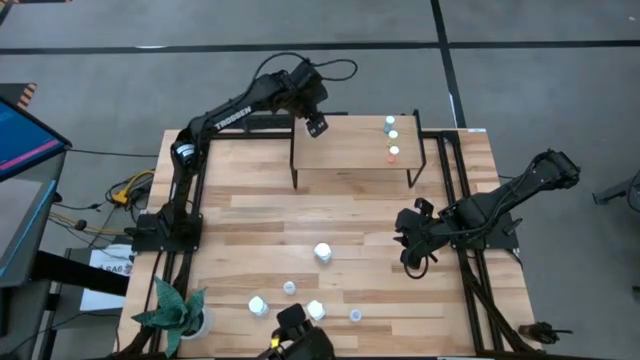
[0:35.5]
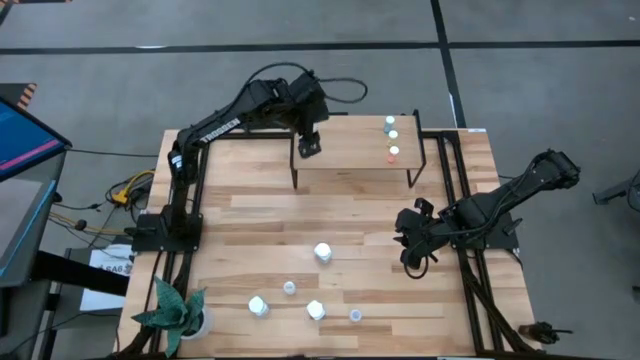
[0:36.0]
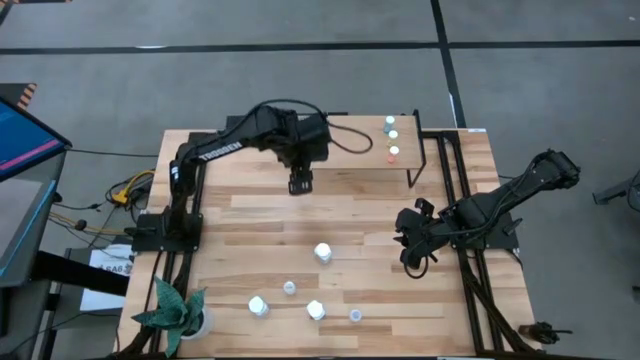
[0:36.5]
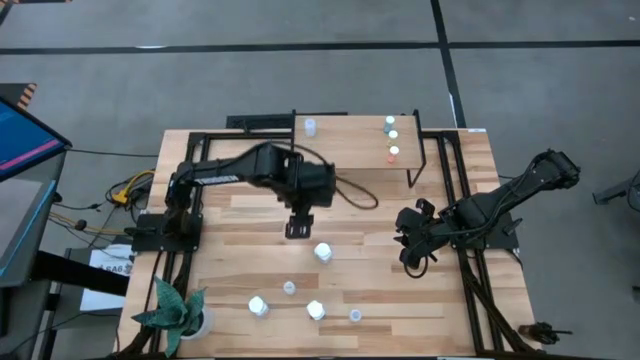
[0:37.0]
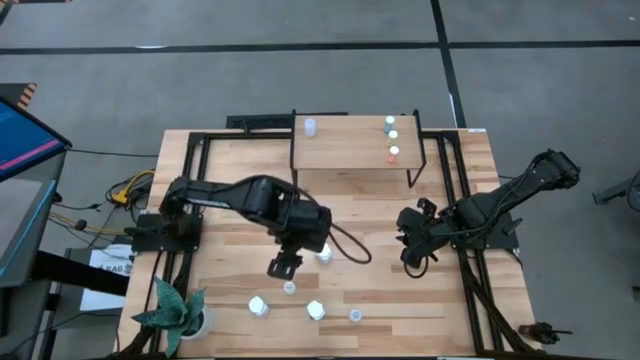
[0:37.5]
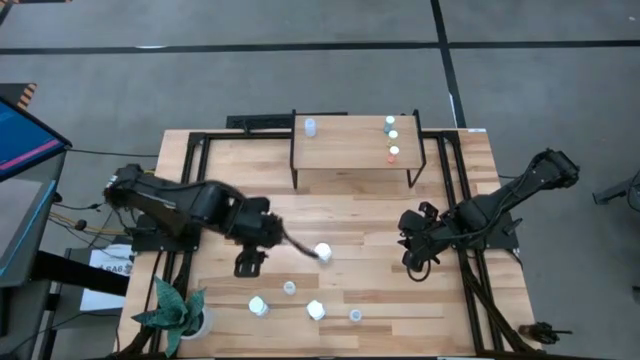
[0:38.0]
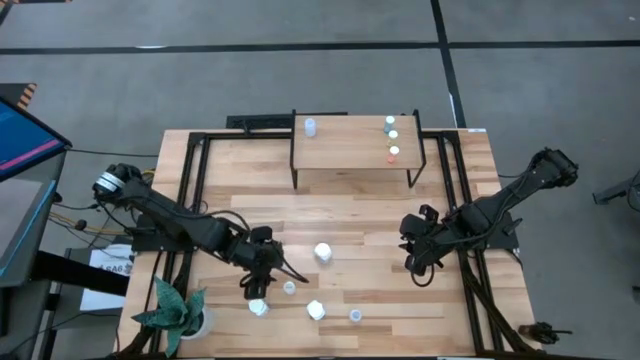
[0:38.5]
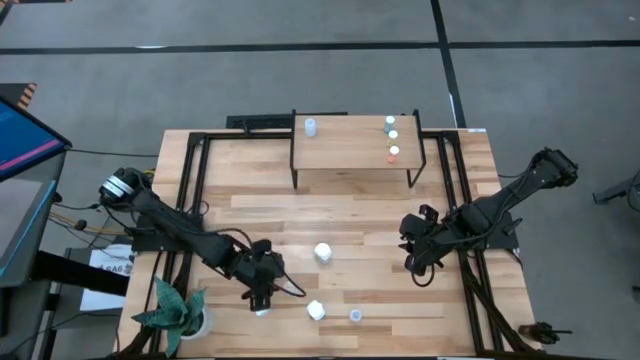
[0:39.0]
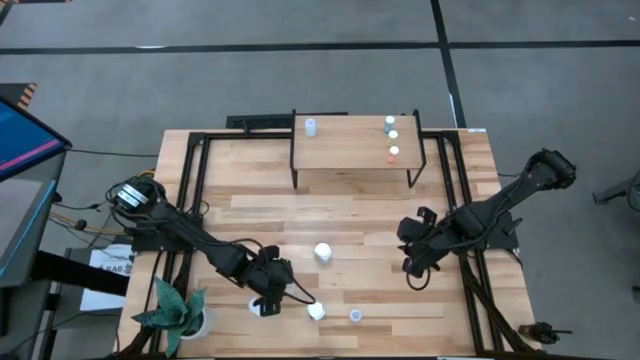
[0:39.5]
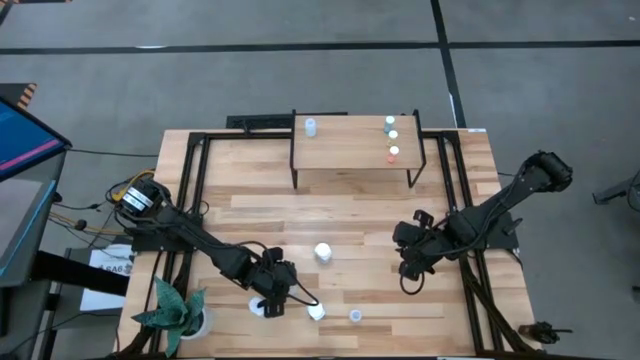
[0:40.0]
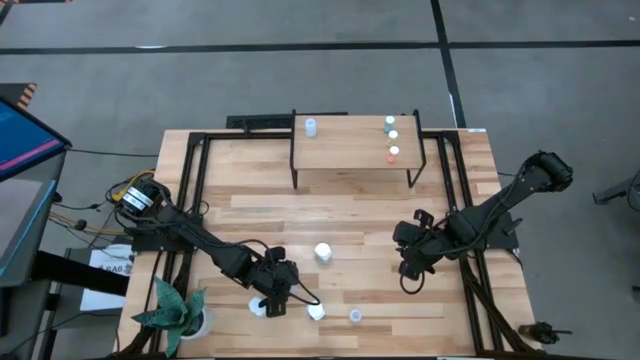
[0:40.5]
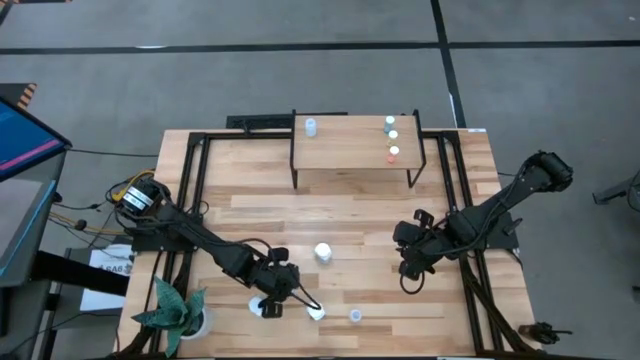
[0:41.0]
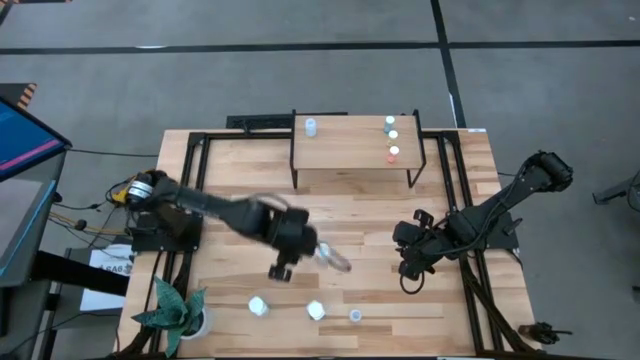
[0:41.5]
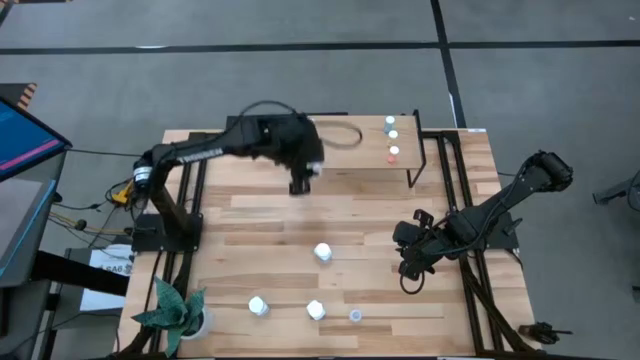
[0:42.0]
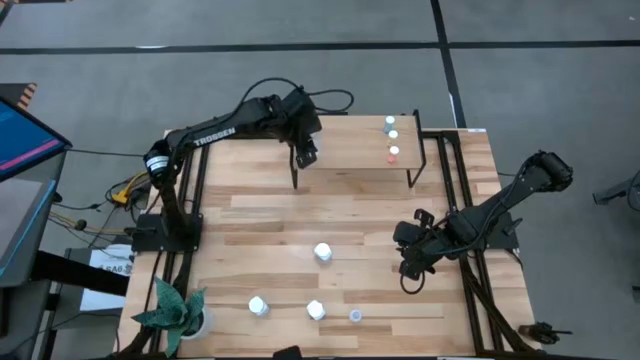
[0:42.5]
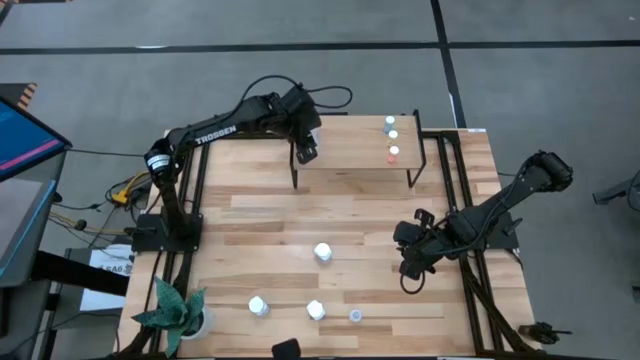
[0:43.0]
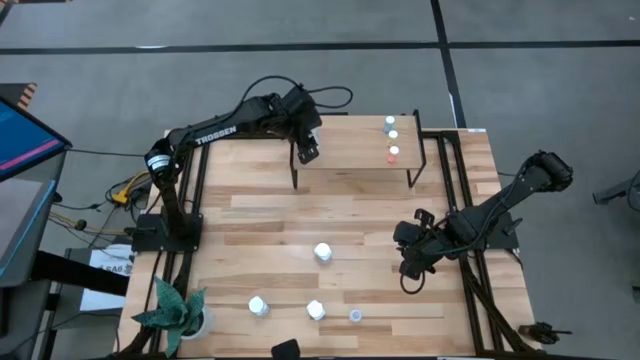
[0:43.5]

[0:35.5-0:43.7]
Task: Pick and place medicine bottles onto shelf by color
Put the top white small pill bottle on the shelf

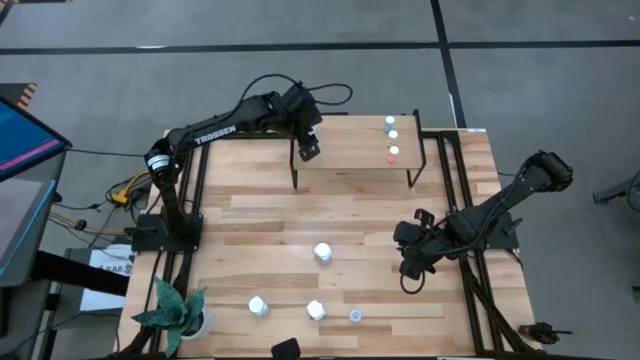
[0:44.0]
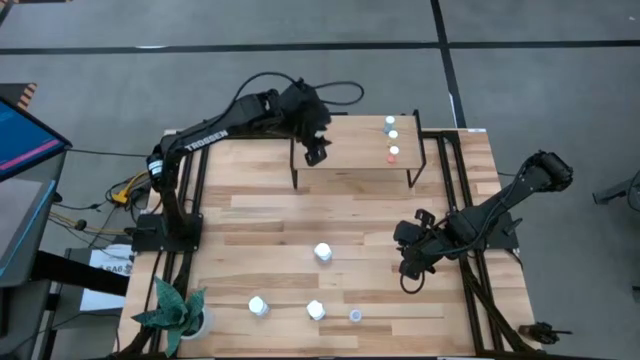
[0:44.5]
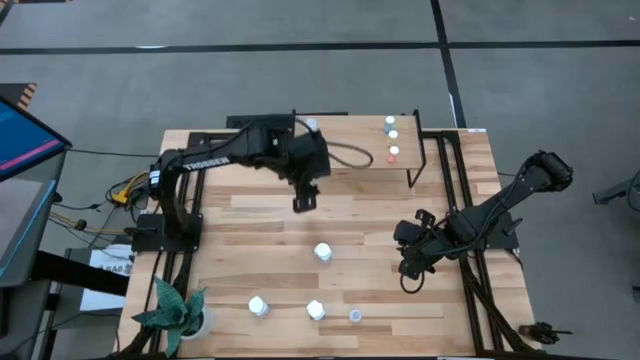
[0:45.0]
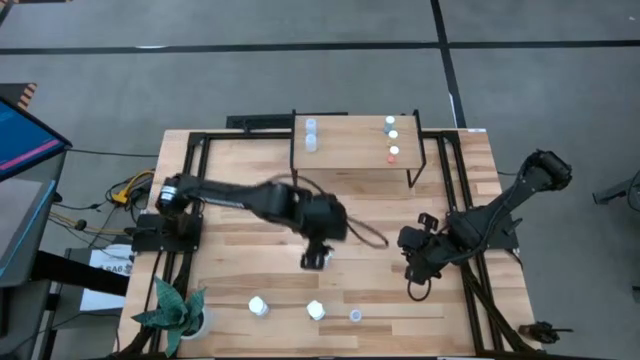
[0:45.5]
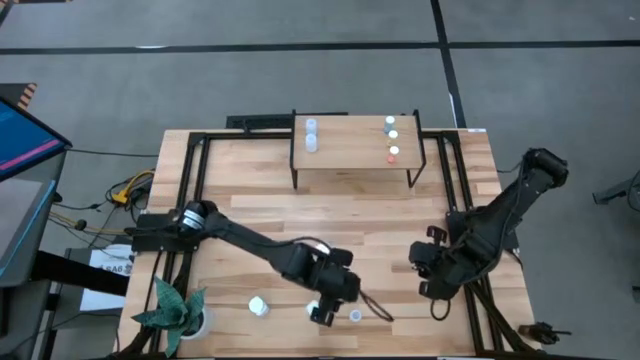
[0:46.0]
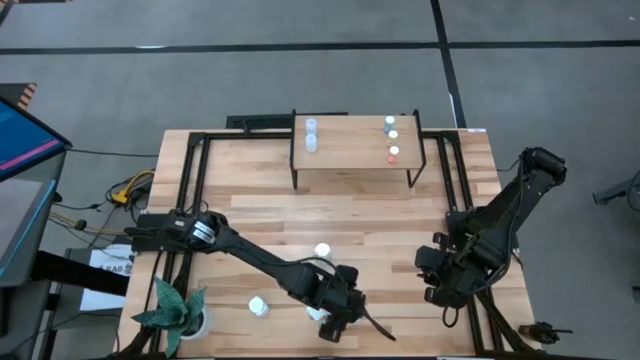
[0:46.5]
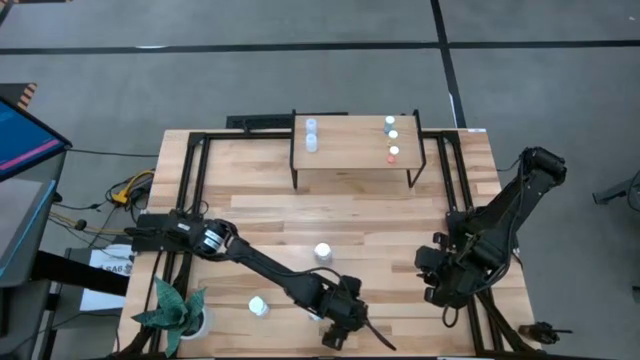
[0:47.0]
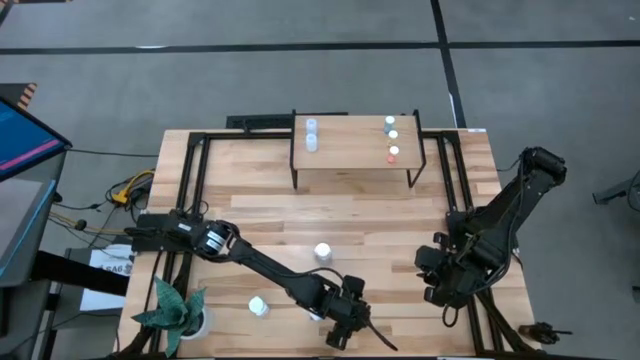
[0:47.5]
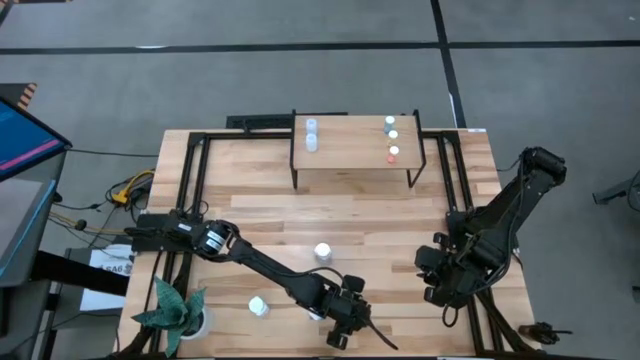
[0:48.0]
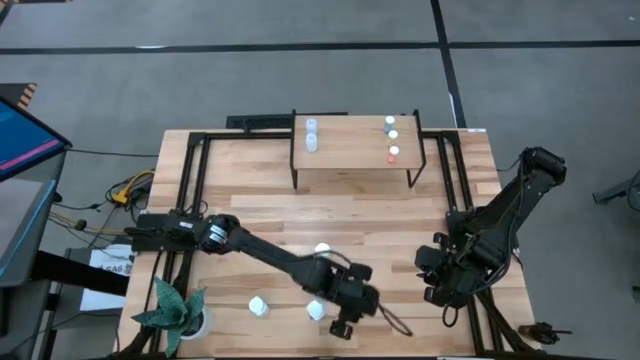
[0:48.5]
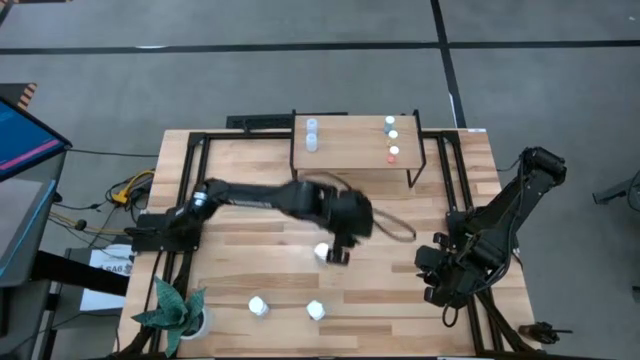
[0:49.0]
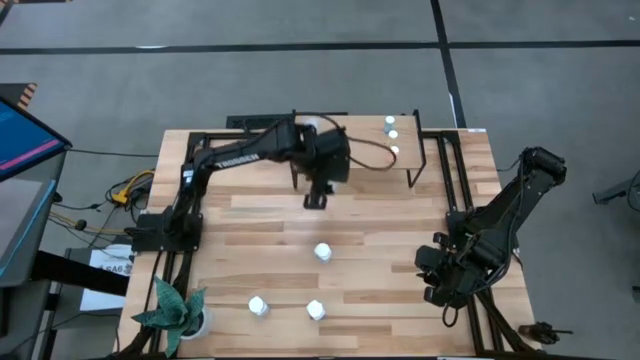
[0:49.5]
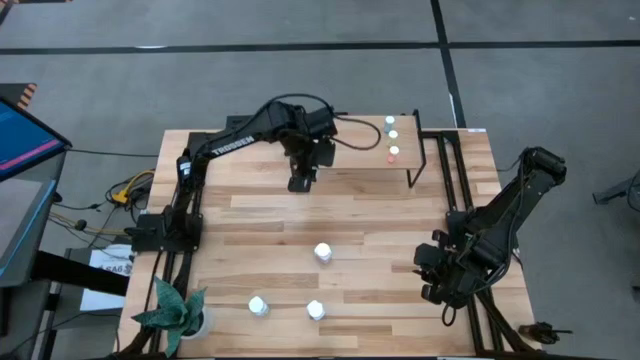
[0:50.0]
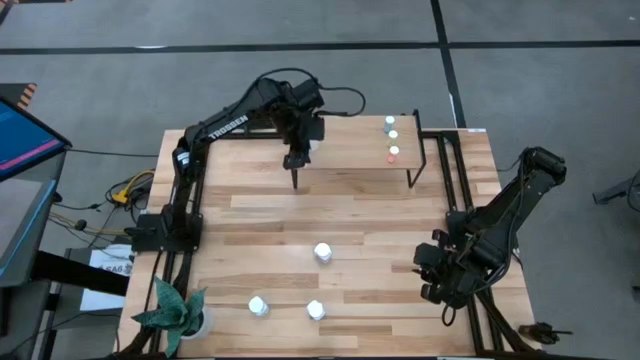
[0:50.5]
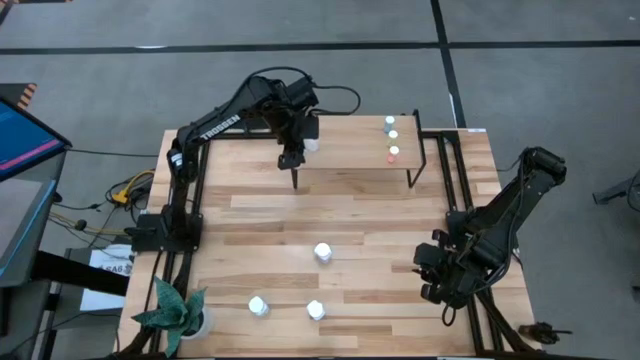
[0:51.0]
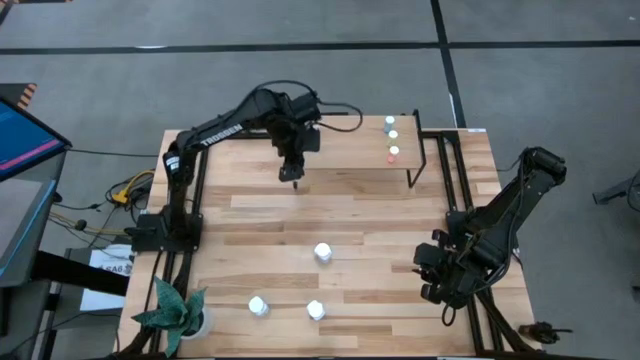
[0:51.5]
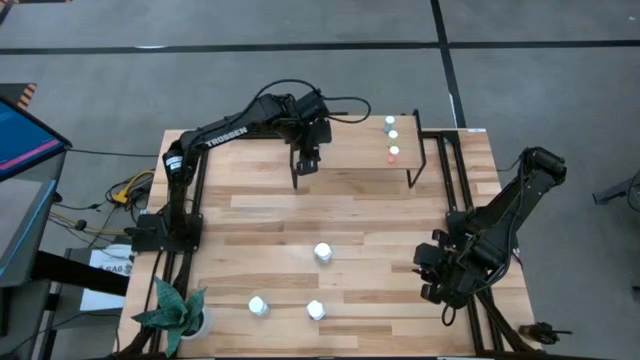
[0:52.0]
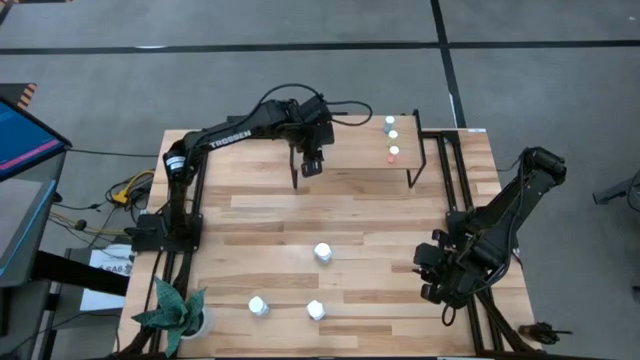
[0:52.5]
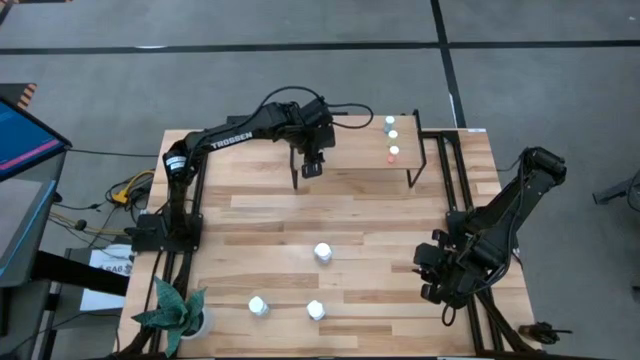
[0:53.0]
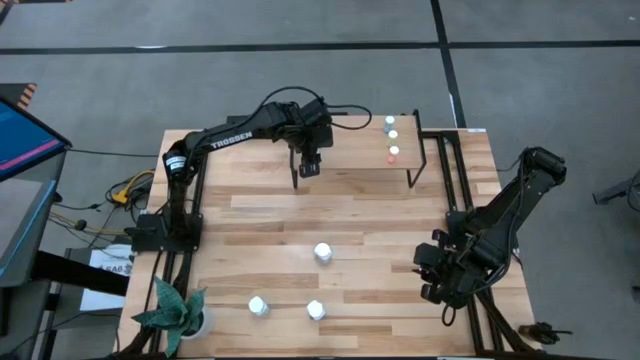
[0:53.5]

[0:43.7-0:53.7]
Put the white small pill bottle on the shelf

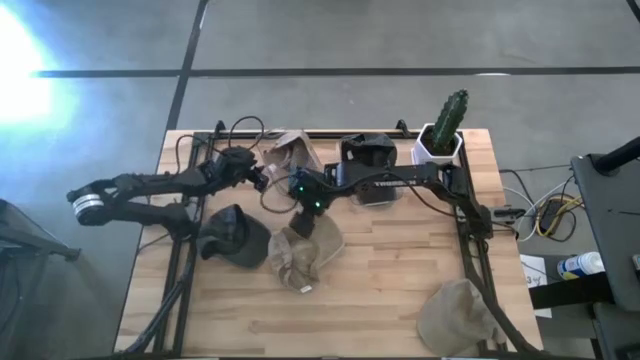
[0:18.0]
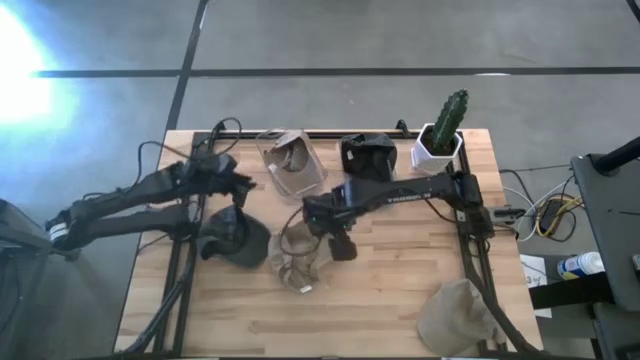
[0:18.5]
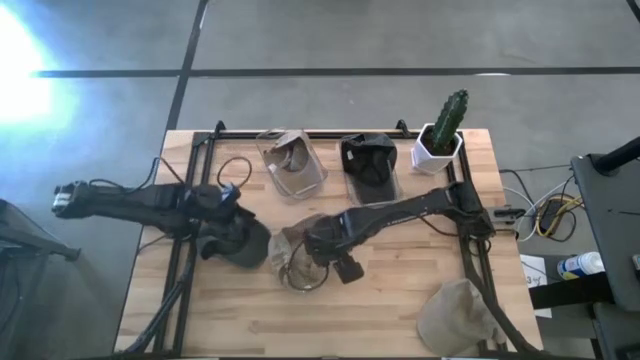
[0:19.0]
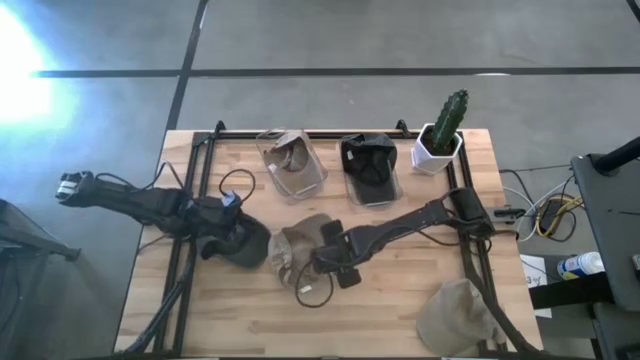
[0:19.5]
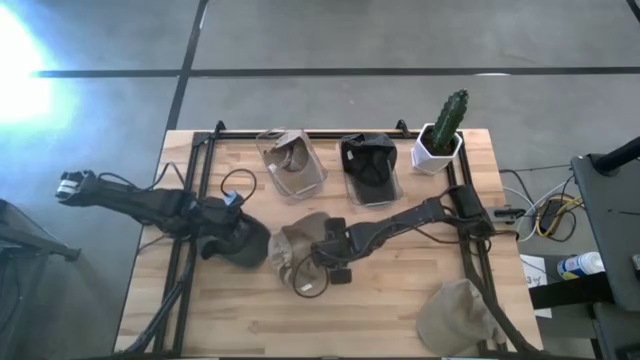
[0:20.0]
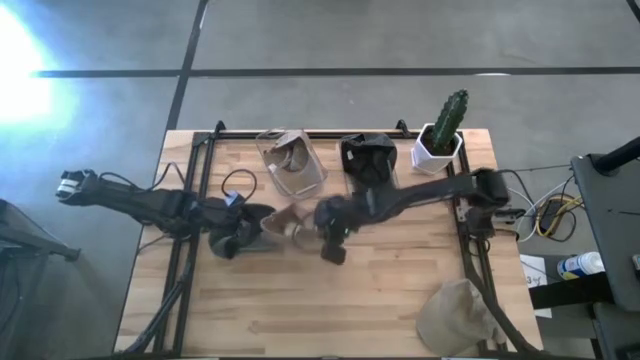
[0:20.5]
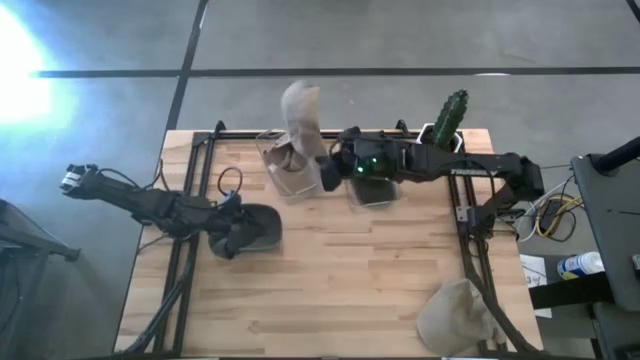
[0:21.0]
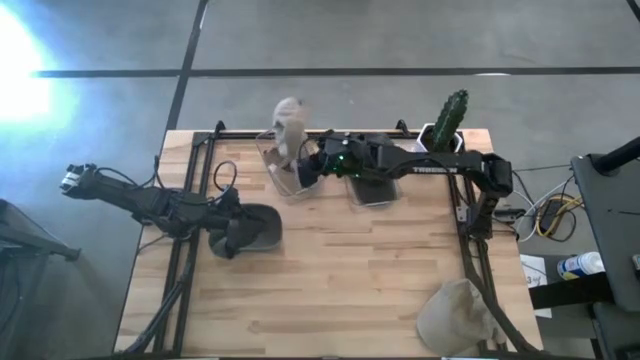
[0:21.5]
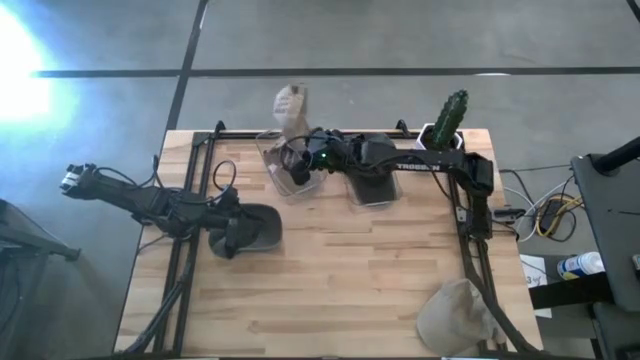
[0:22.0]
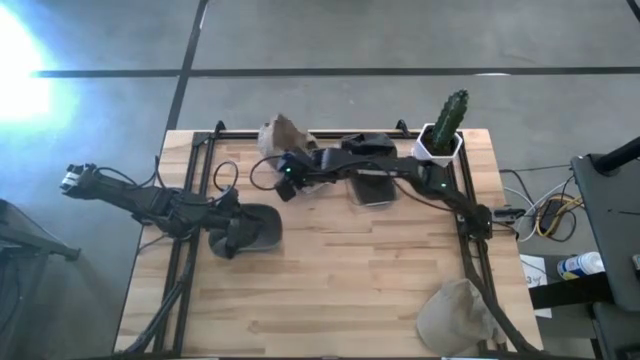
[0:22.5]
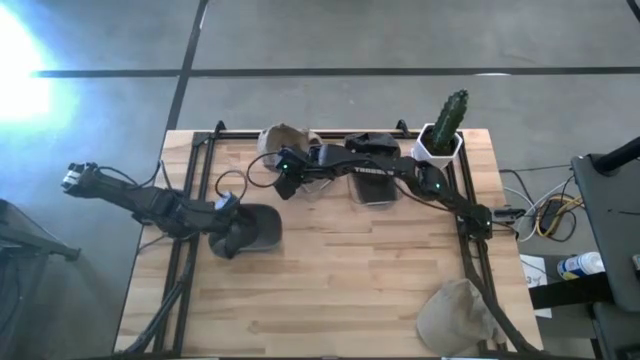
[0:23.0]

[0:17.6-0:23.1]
Task: Pick & Place hat
Put the left brown cap into the left transparent bin
